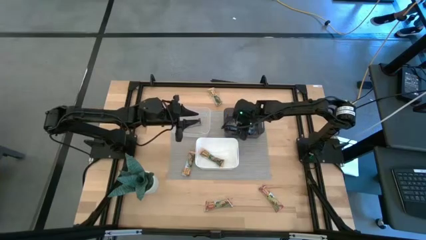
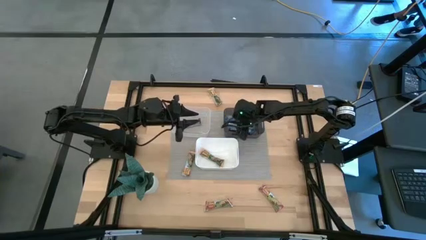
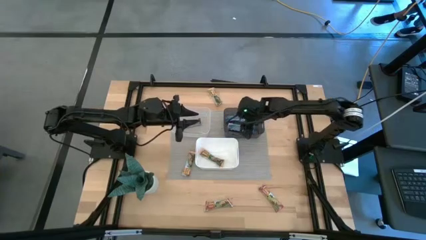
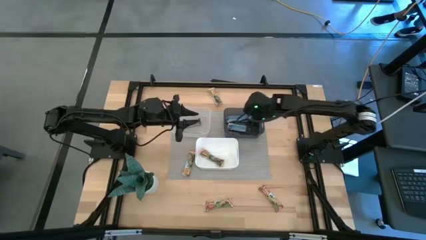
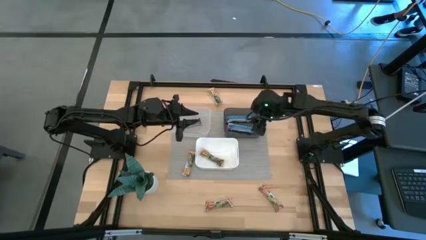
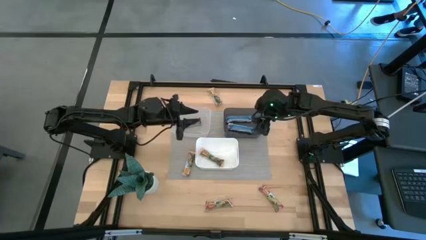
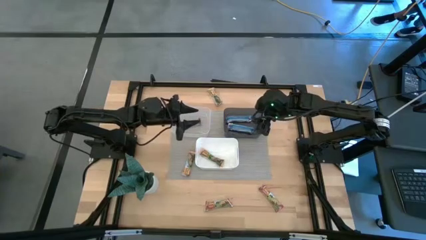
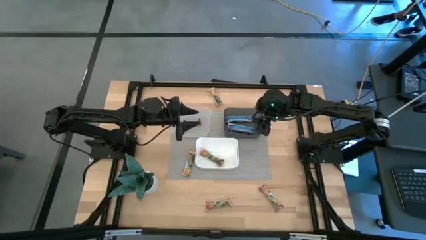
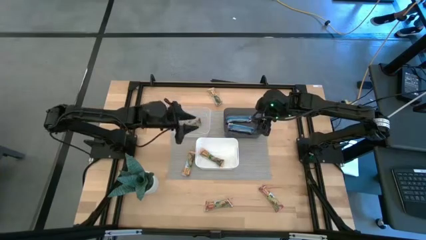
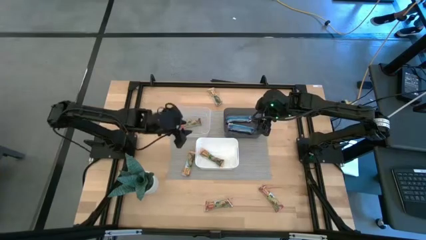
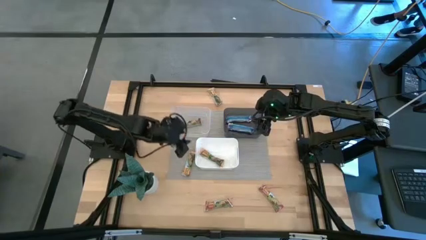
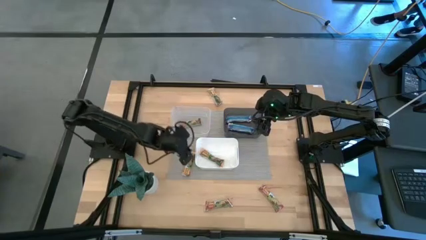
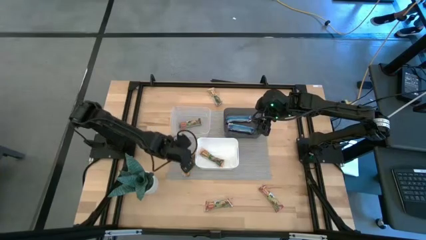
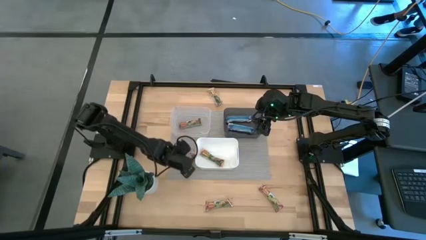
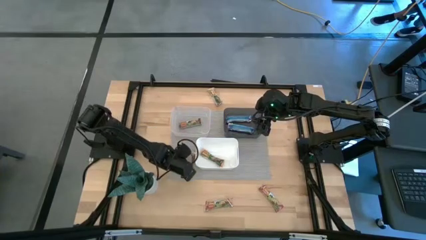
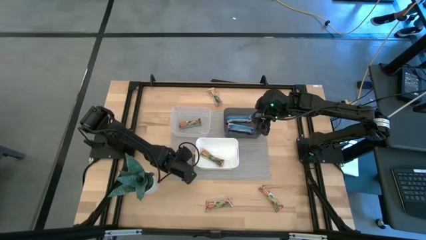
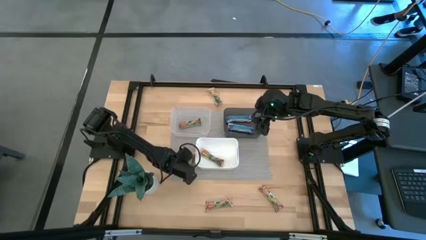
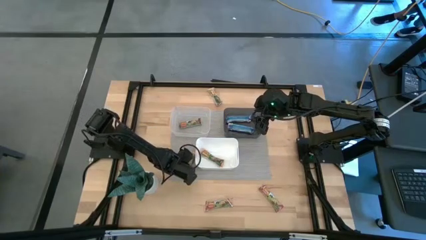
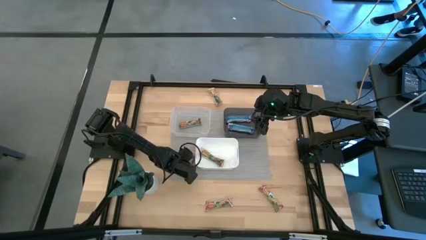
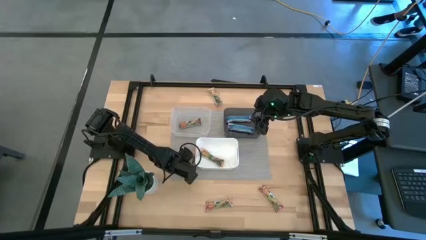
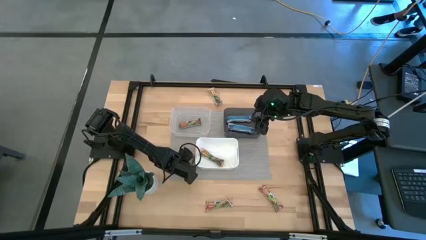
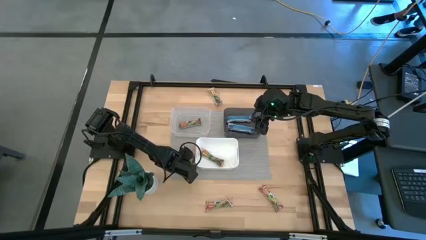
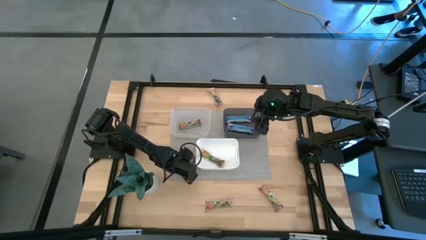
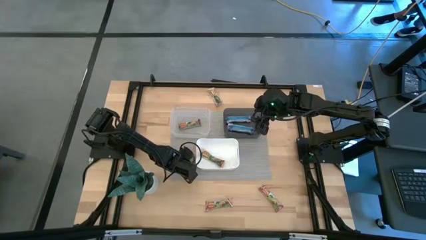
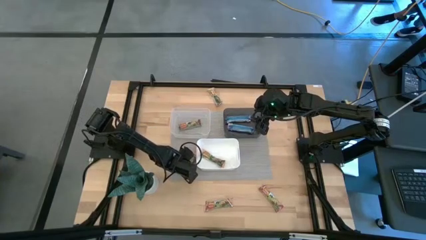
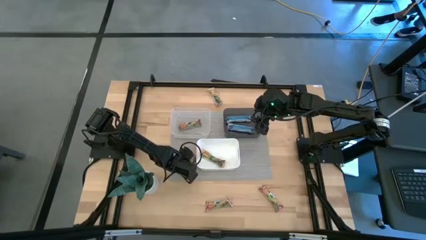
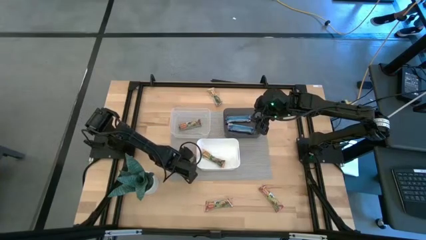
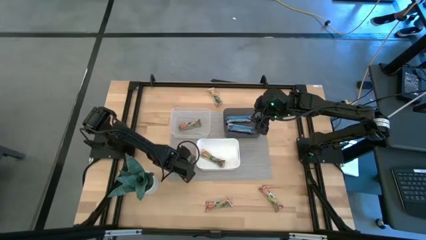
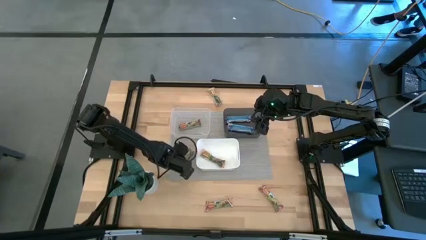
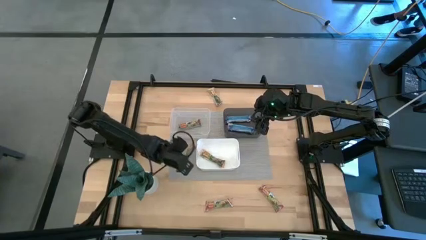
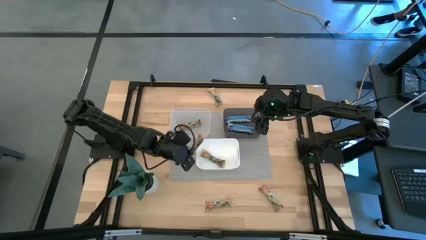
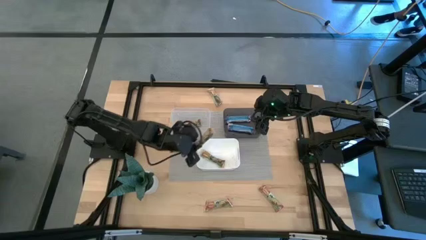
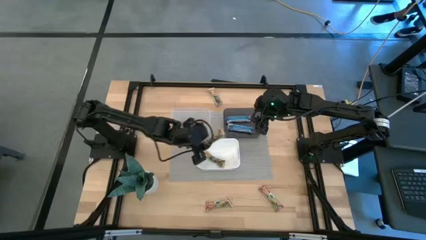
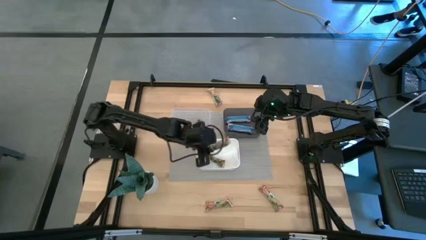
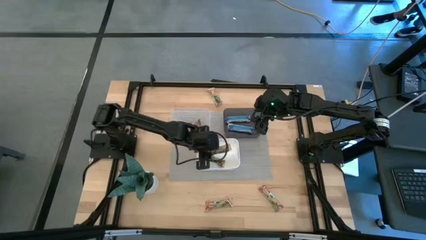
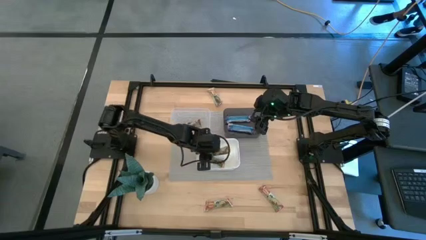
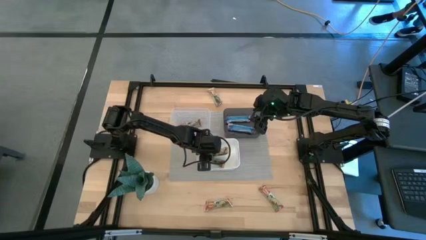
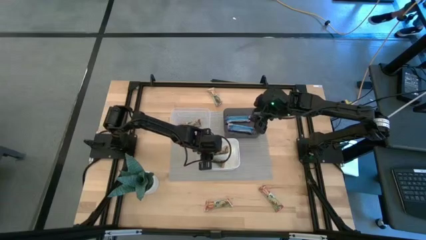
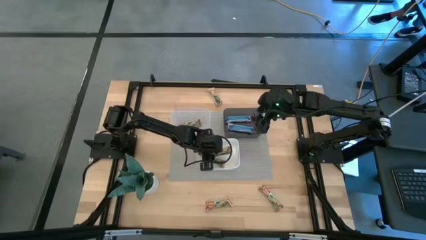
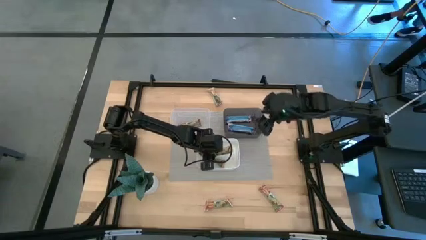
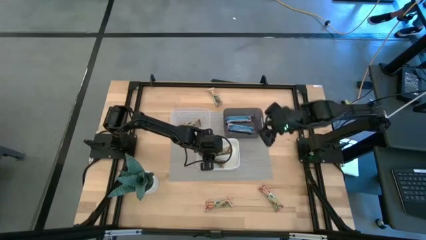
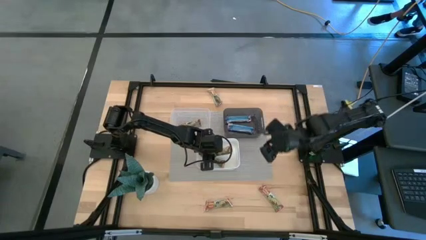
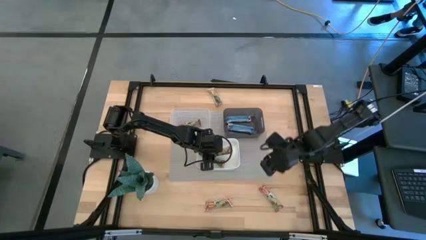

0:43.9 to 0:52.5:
Task: Pick and place Granola Bars by type
Put the bottom yellow granola bar into the white bin

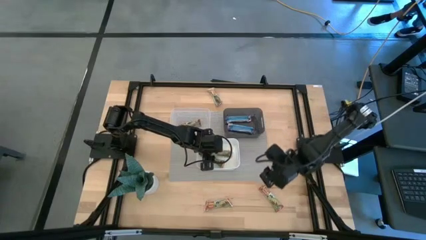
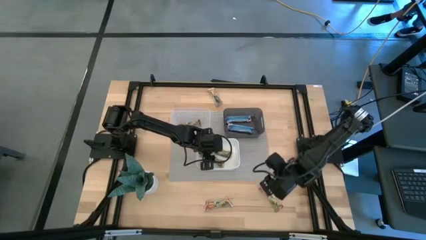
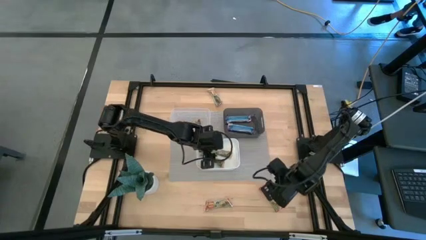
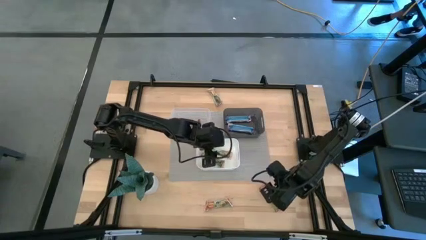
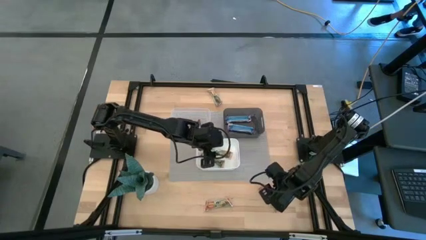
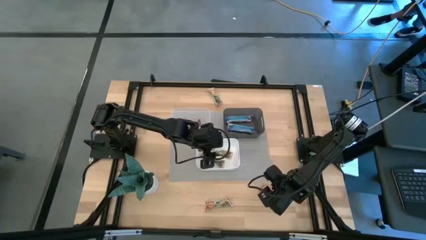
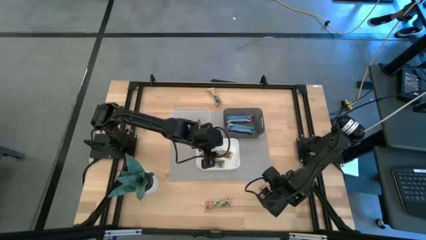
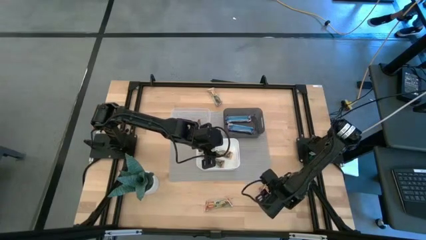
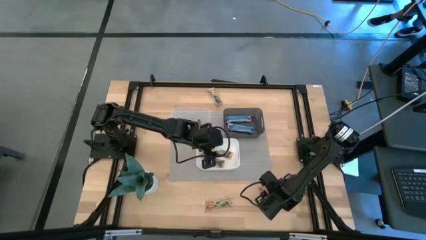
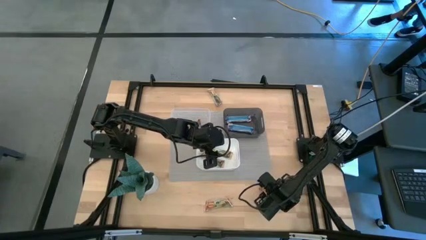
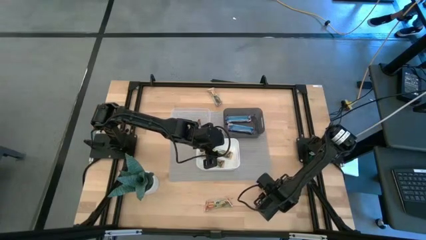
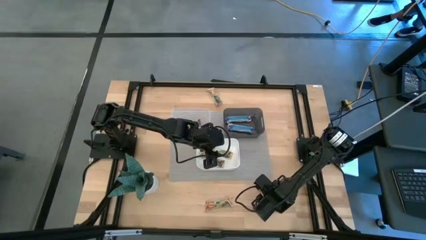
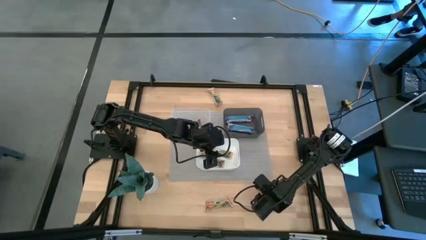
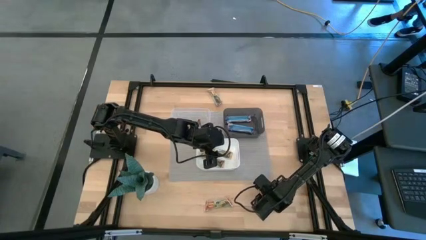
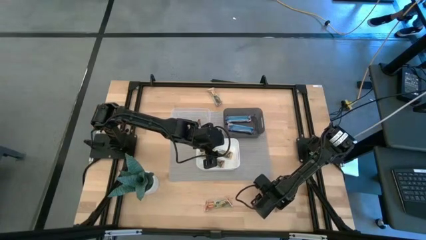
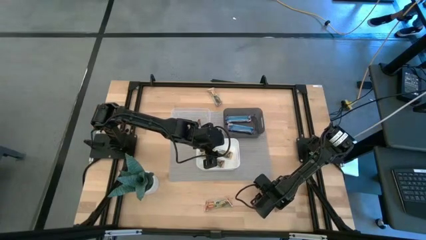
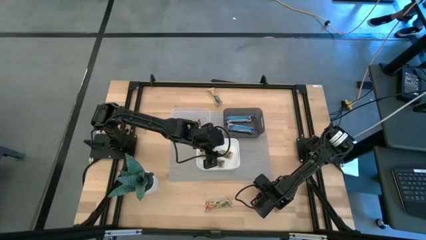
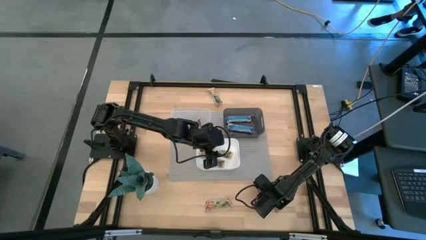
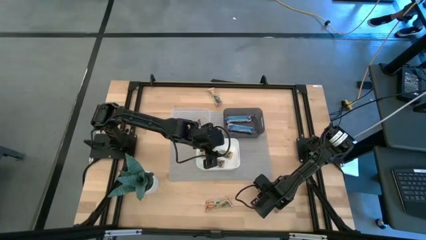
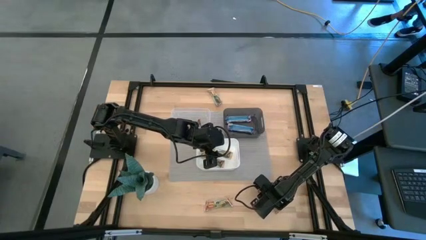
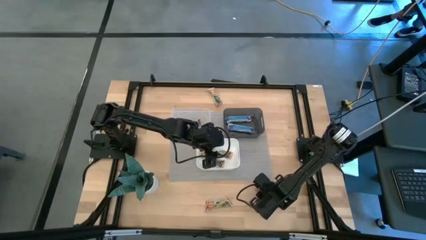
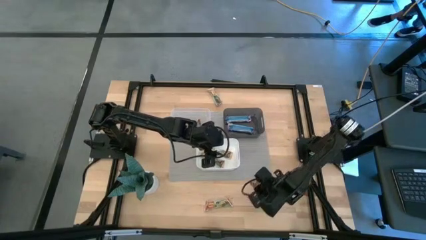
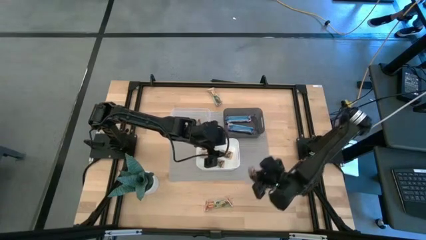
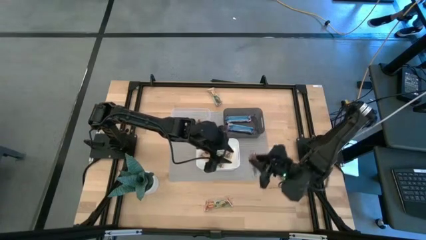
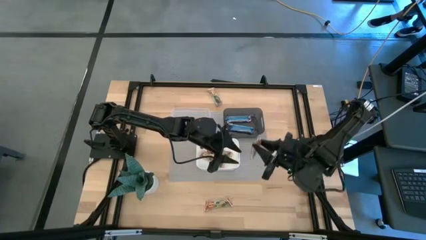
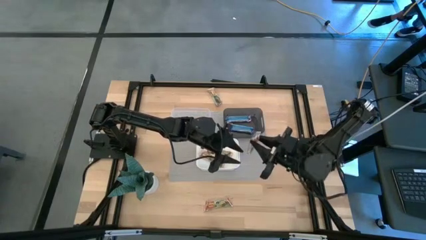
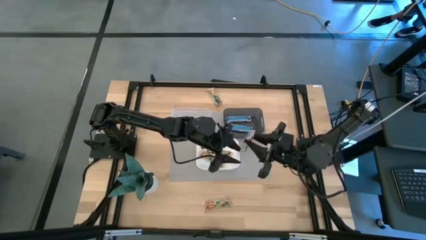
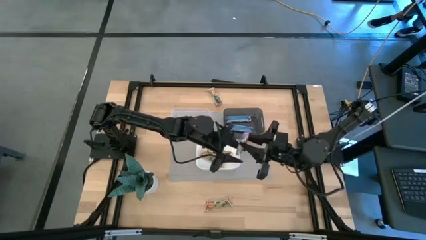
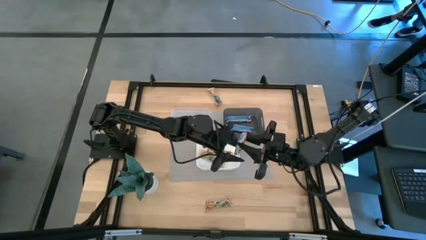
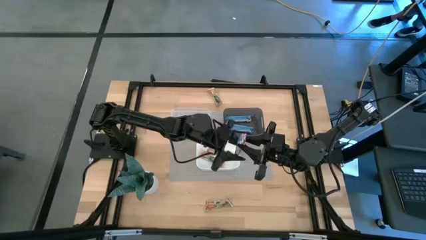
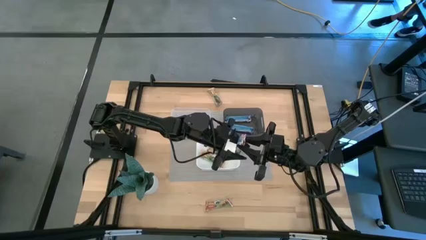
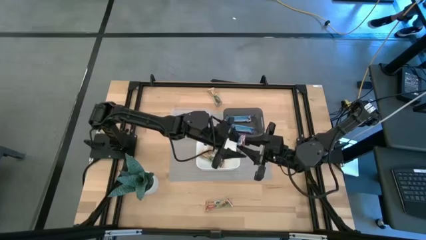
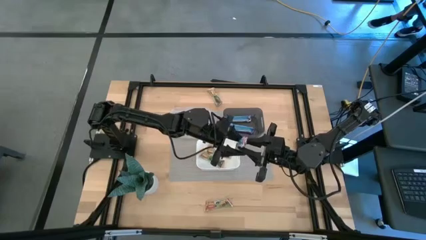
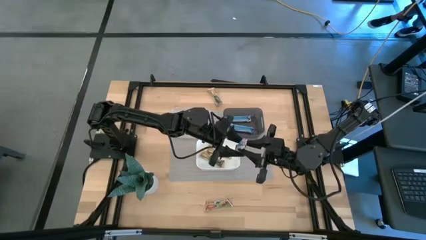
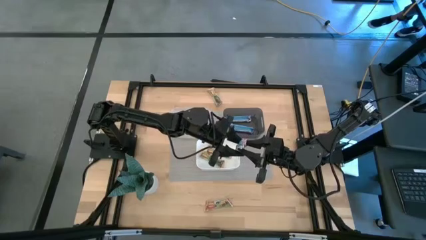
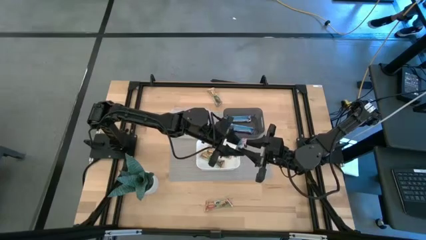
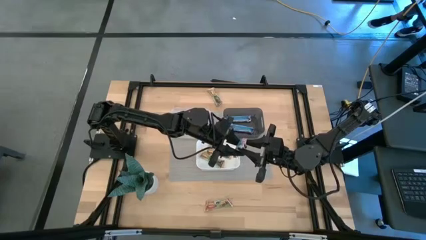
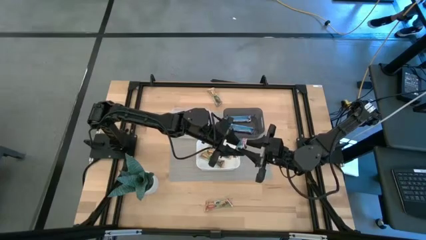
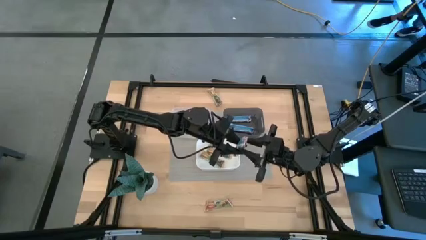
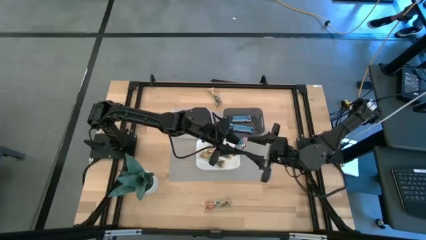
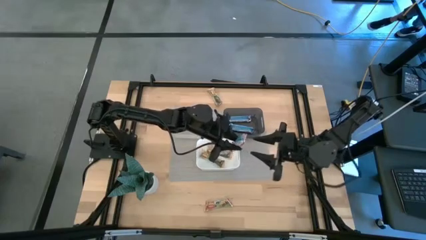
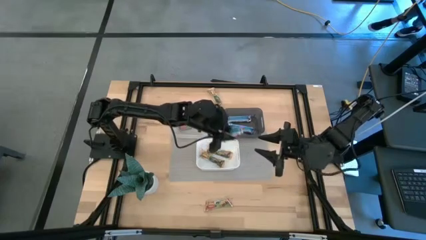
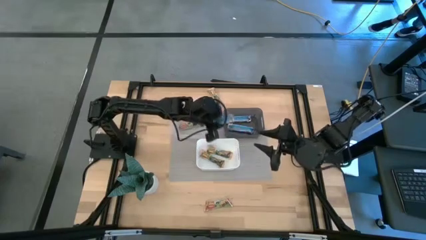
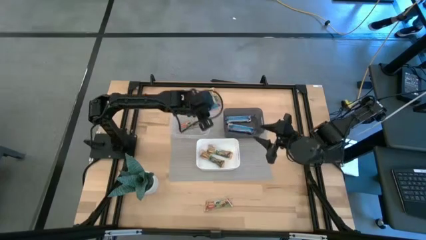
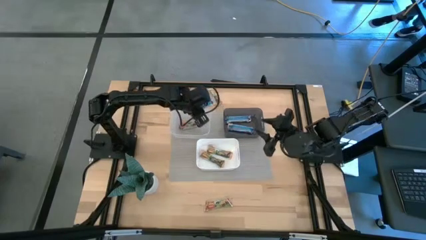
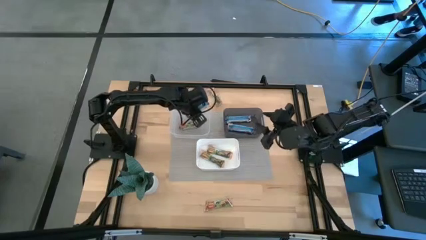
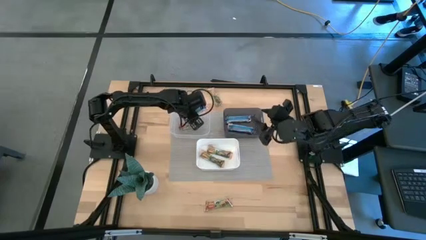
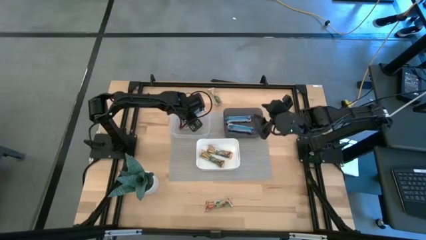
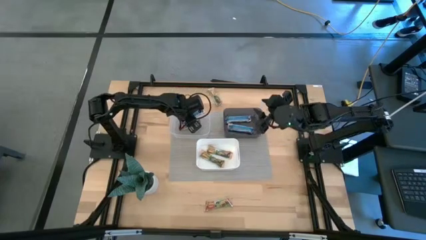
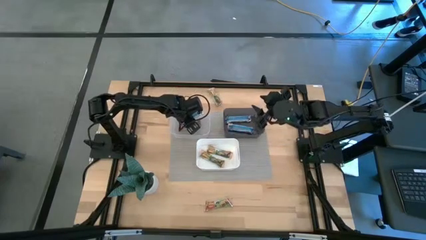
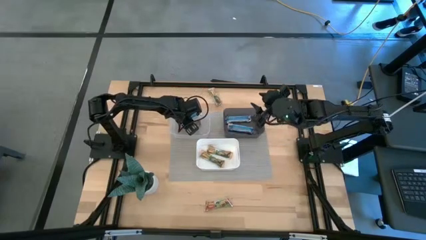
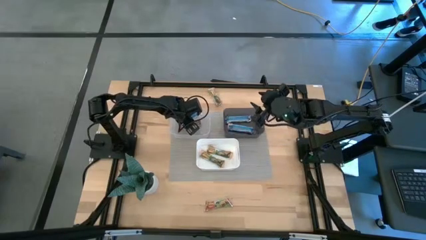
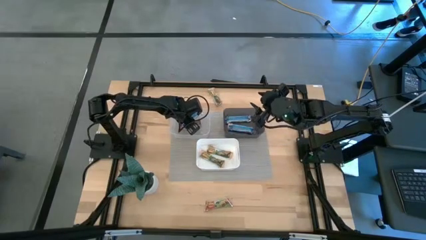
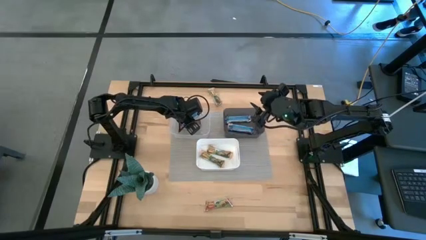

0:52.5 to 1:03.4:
Put the right red granola bar into the transparent bin
